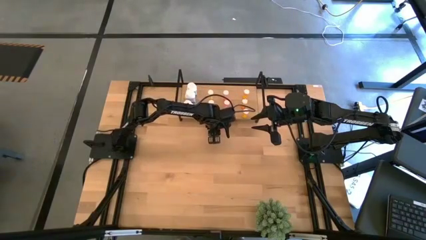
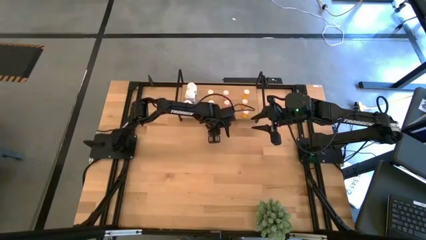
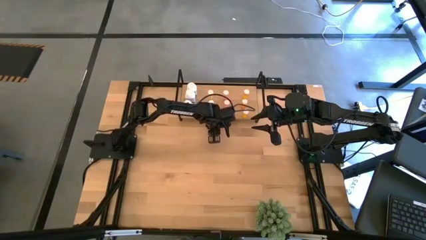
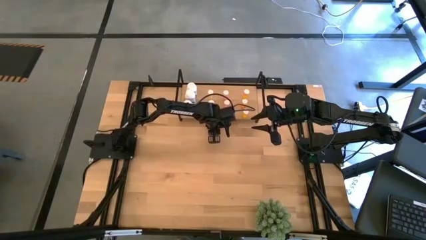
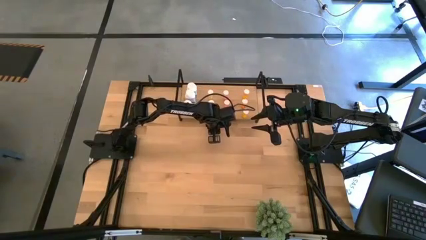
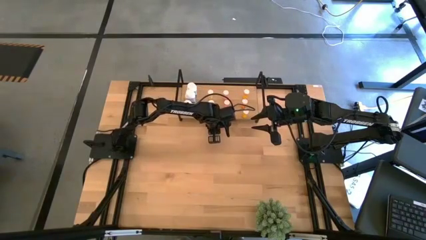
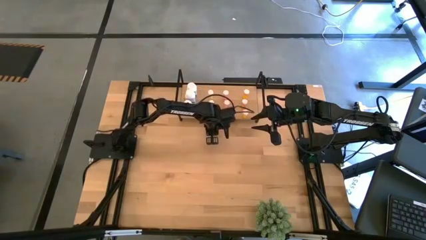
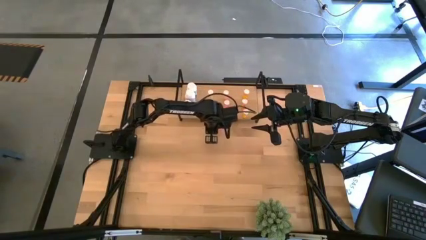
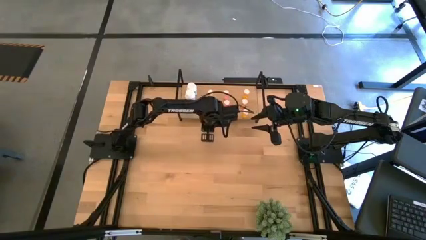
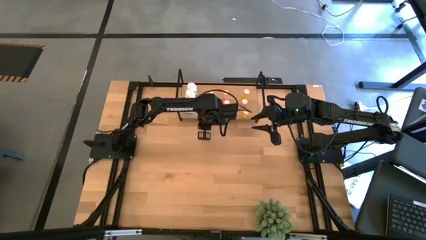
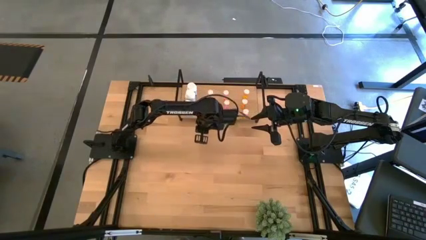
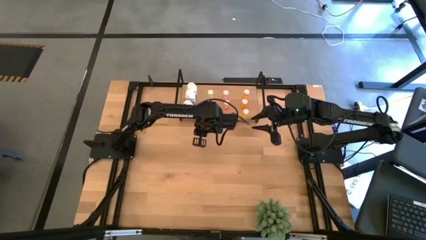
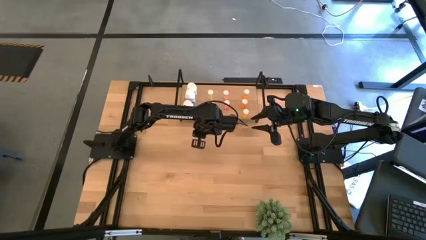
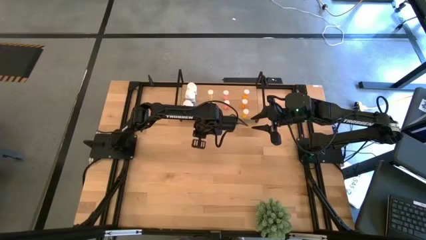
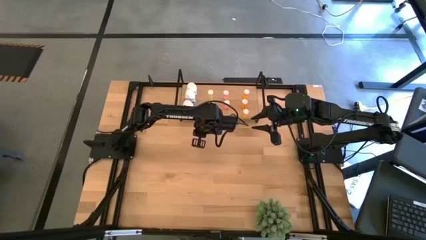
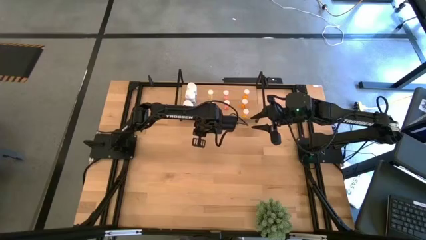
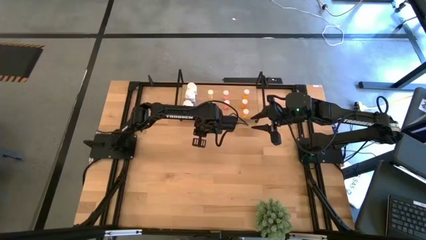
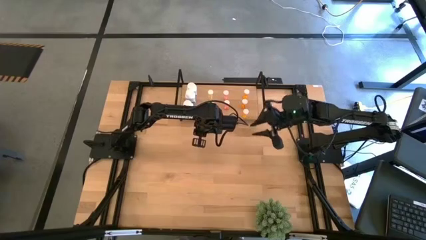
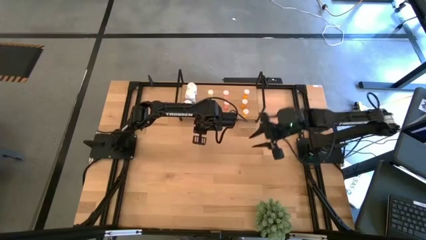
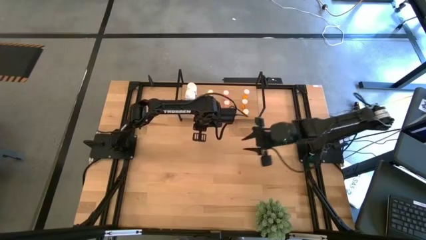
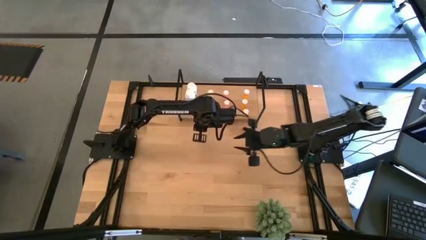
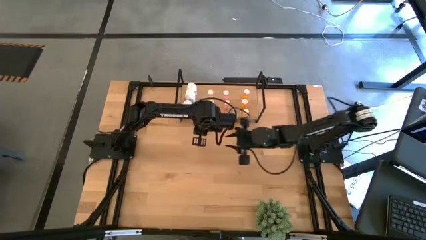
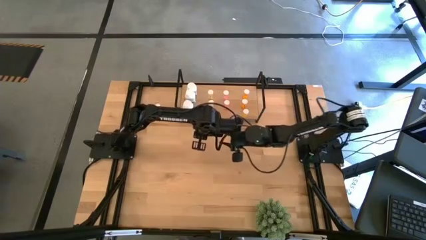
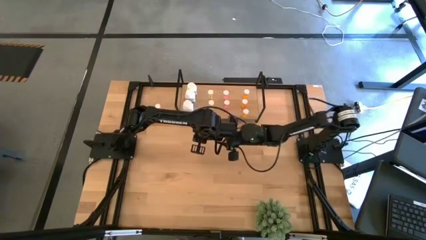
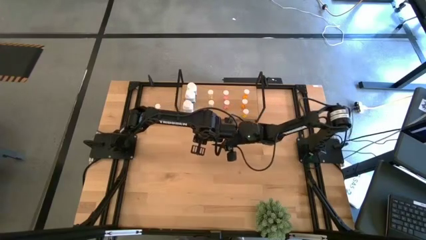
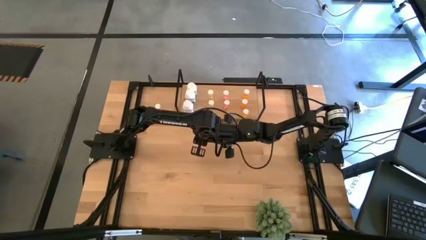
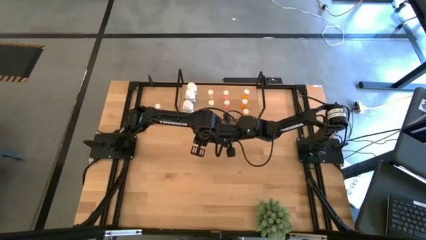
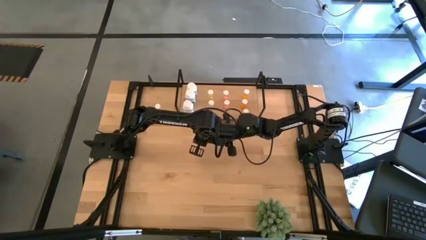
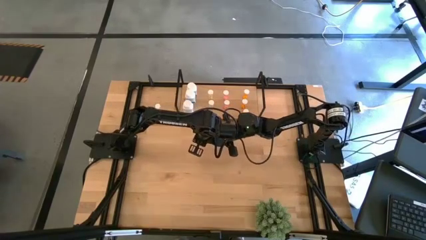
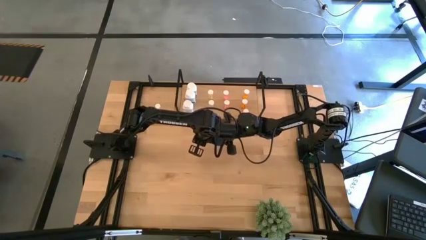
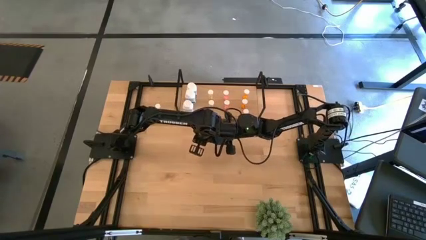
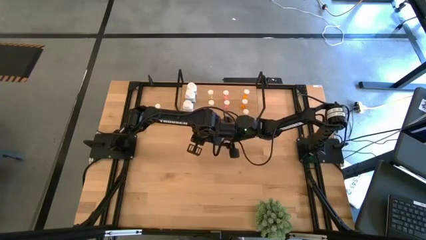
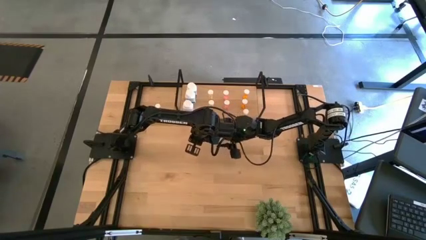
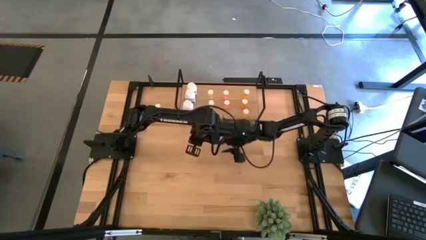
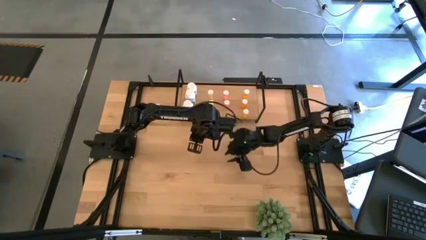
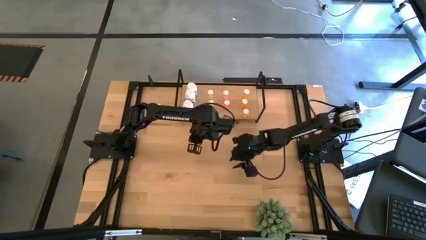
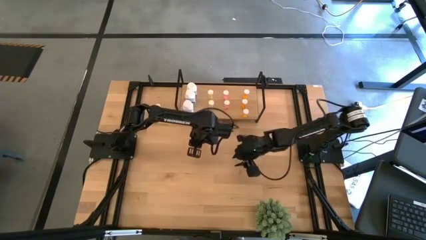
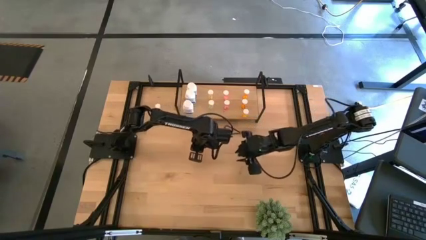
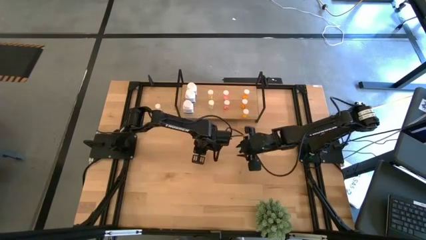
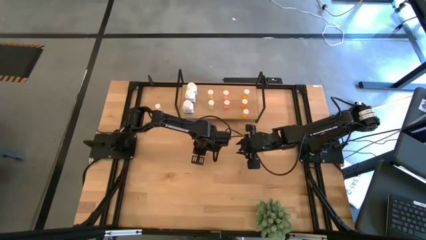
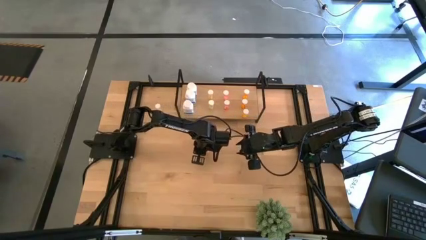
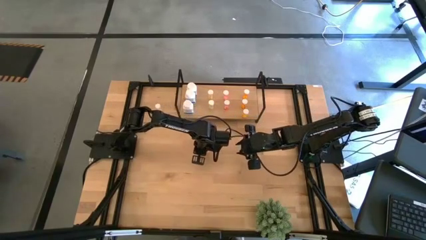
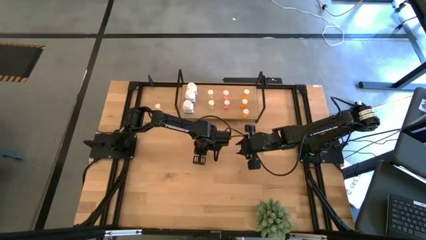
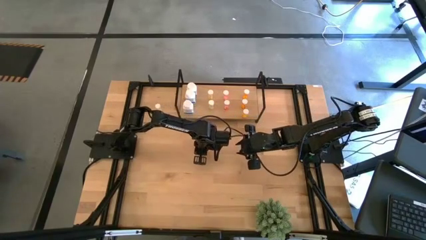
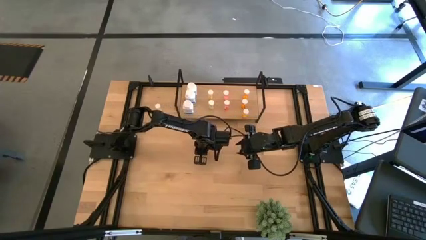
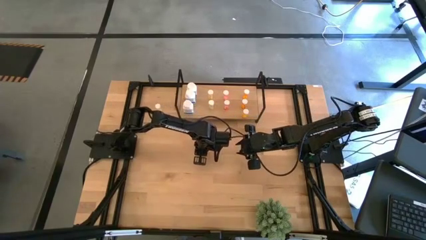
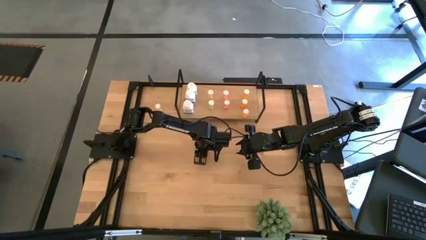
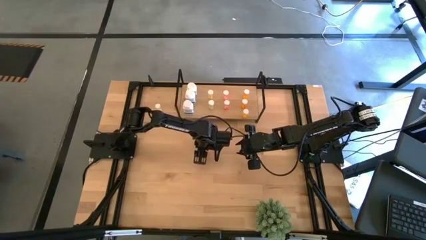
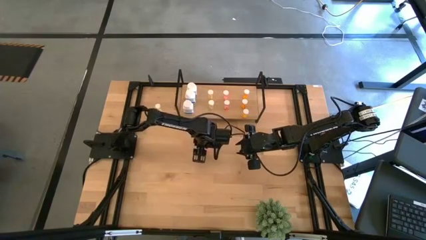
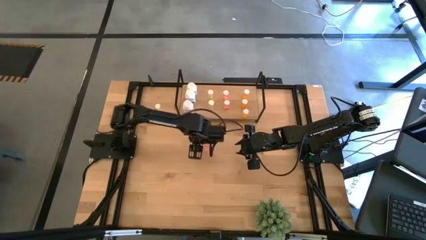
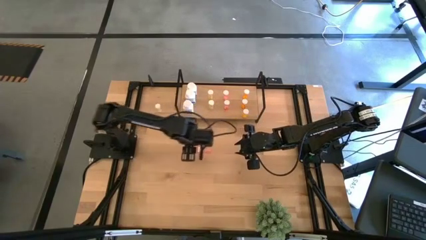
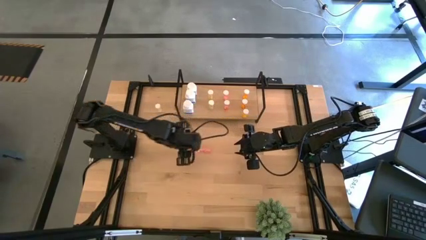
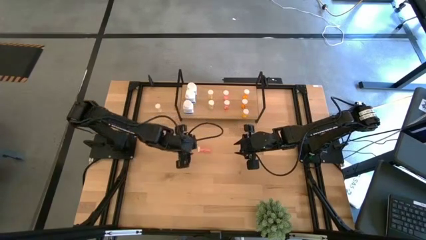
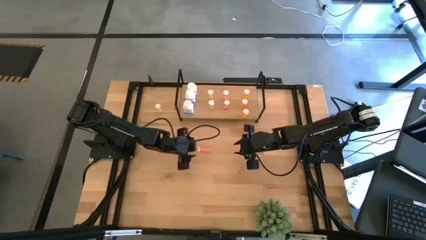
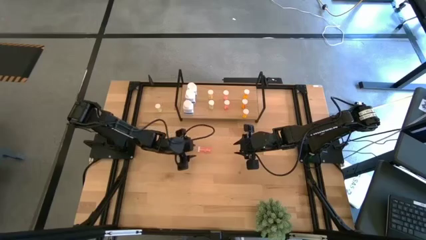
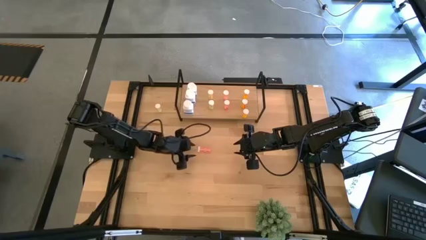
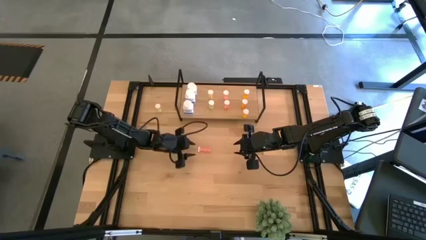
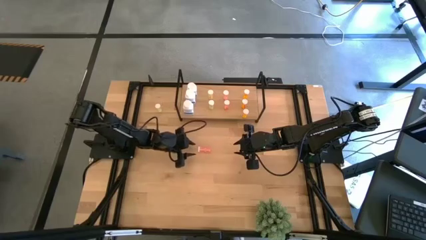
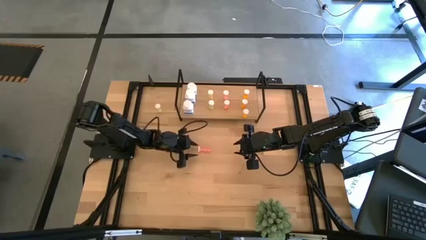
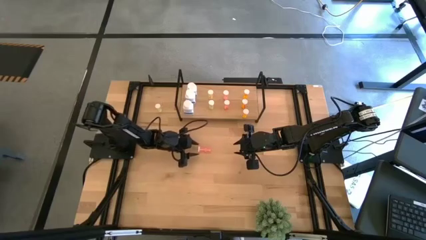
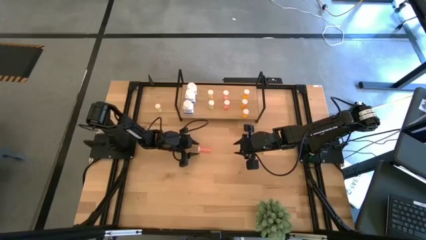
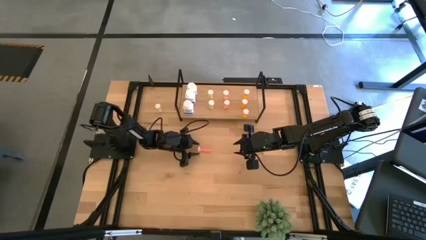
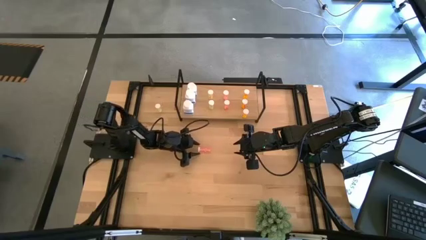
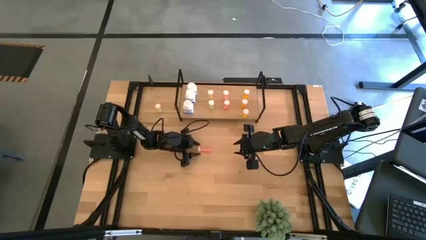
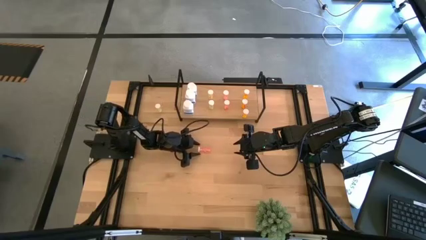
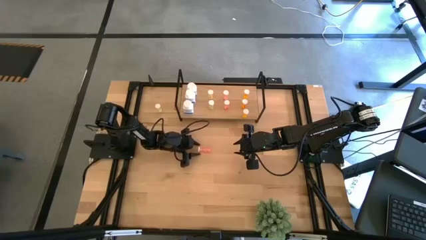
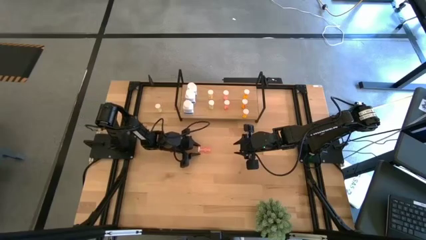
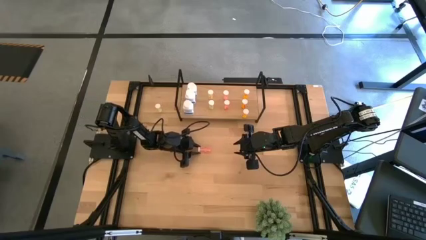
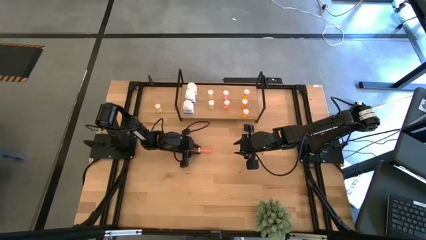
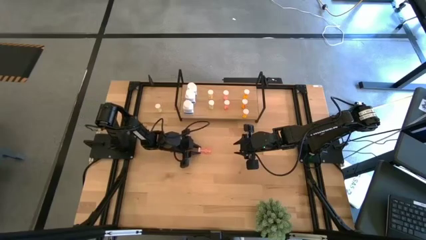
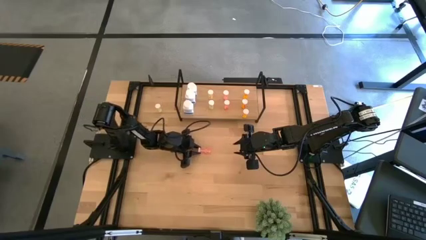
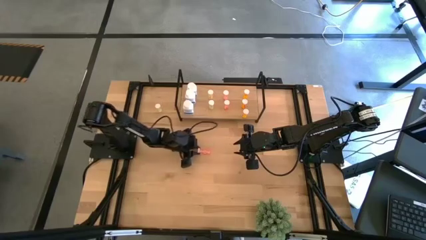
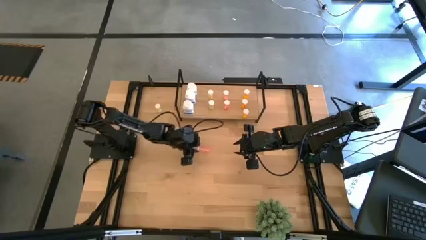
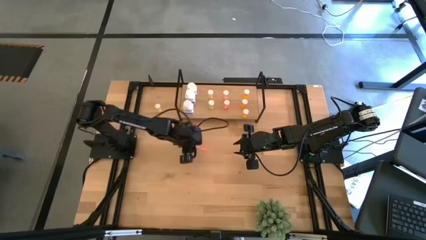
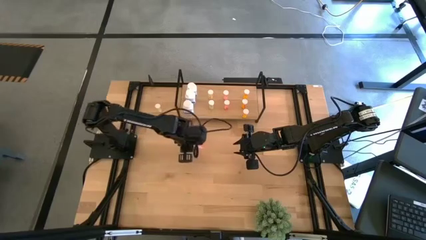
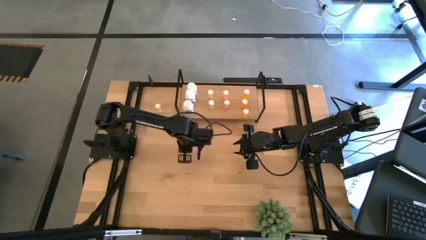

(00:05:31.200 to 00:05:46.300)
Task: Pick and place medicine bottles onto shelf by color
Put the red pill bottle on the shelf aligned with the other red pill bottles
